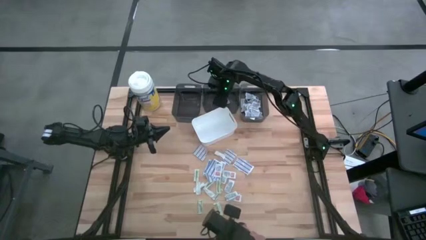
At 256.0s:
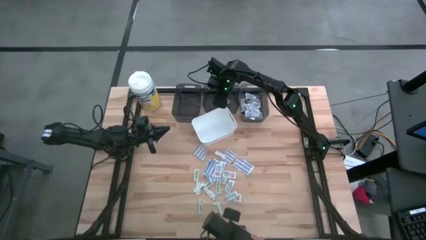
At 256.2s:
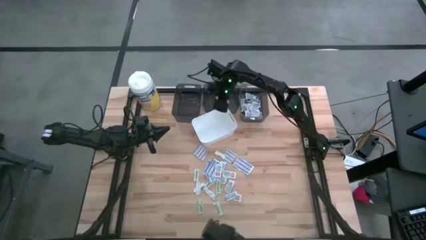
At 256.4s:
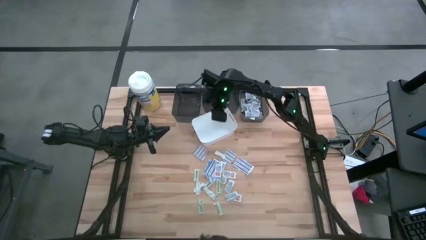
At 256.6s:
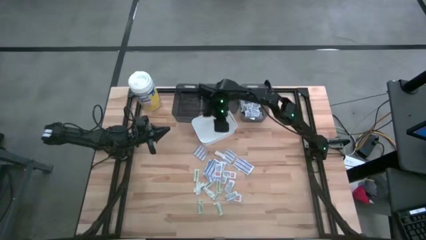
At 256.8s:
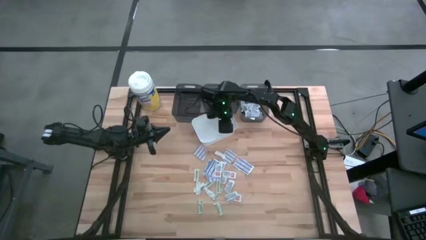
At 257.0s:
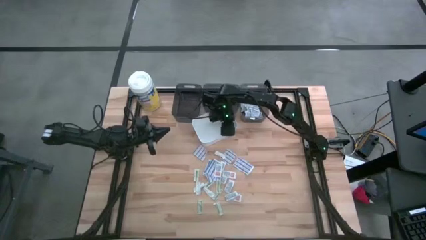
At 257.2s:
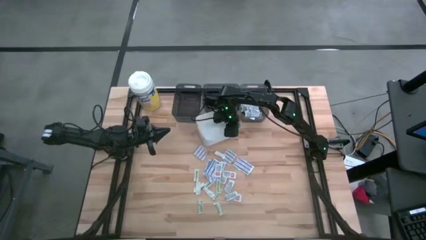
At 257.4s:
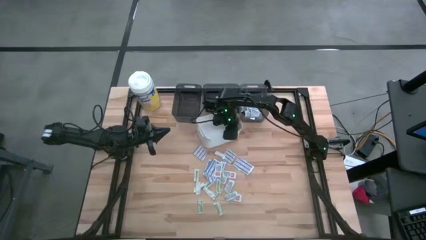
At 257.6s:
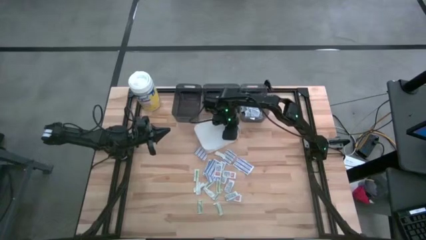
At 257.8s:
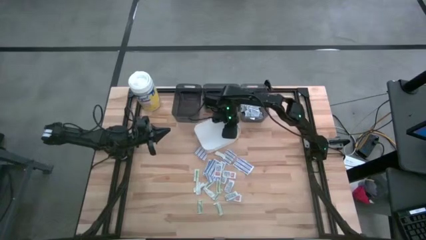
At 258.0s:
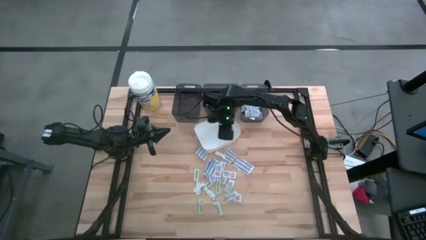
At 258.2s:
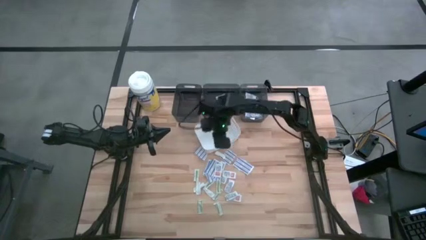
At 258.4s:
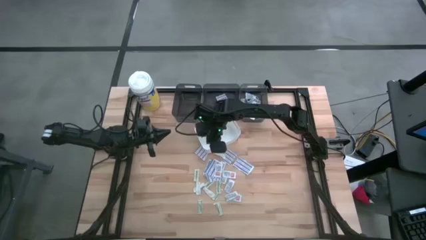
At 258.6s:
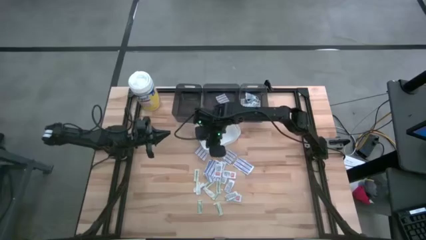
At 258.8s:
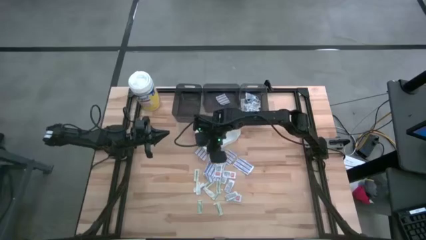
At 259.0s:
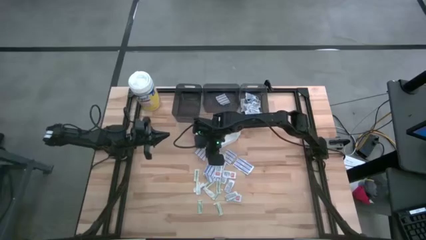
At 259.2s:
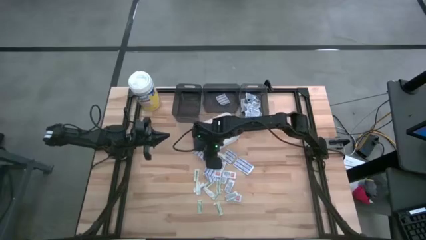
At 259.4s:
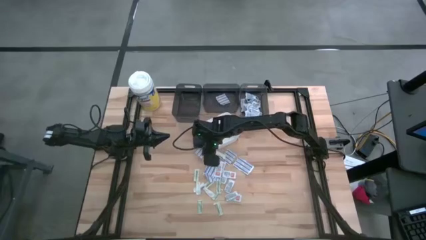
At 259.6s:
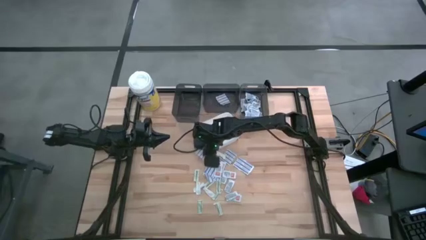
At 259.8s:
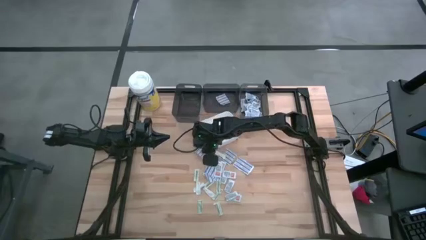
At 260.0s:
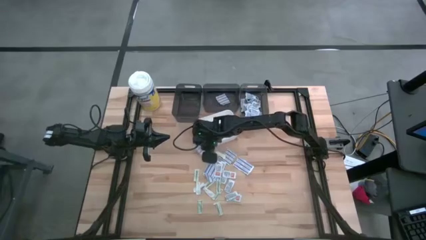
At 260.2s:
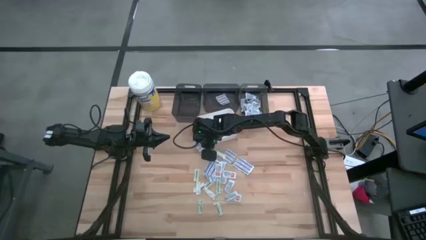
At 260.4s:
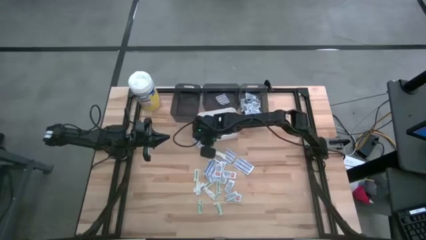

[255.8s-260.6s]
Task: Pick & Place First Aid Supplies
Adjust the white bin

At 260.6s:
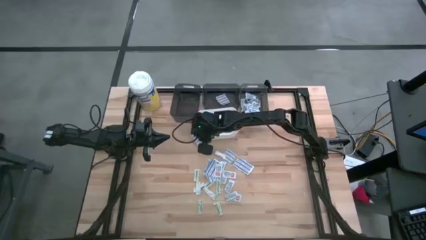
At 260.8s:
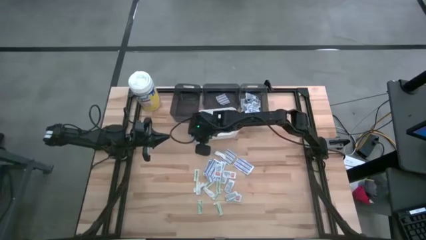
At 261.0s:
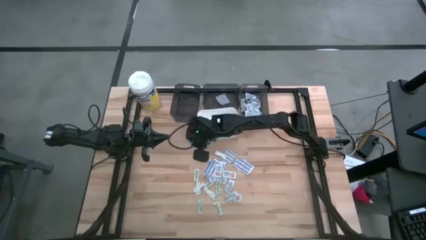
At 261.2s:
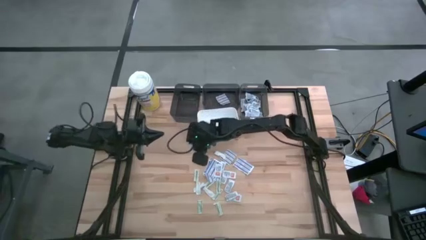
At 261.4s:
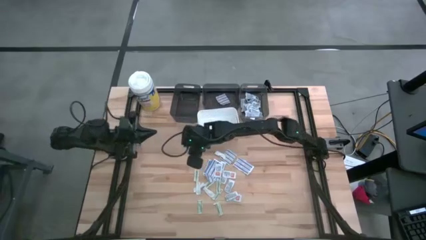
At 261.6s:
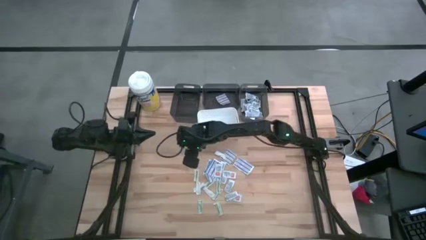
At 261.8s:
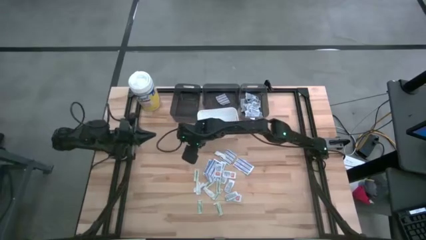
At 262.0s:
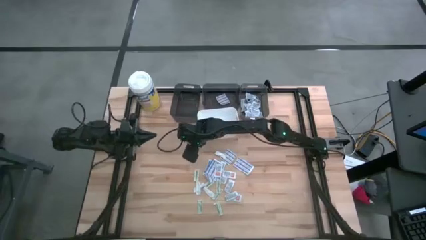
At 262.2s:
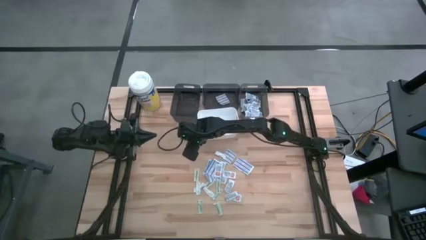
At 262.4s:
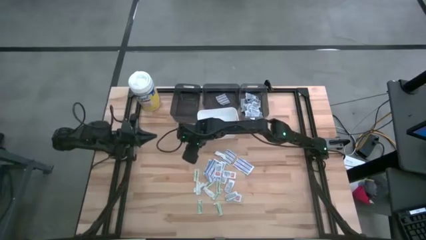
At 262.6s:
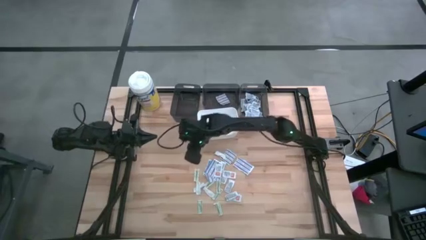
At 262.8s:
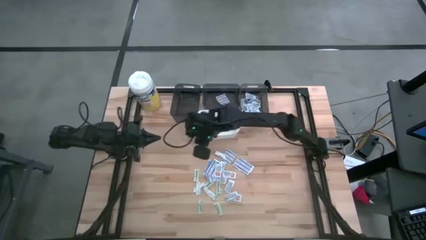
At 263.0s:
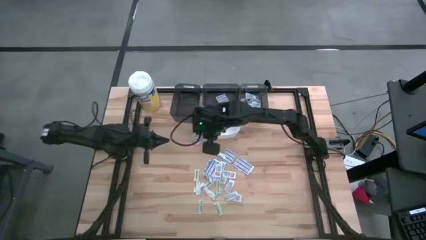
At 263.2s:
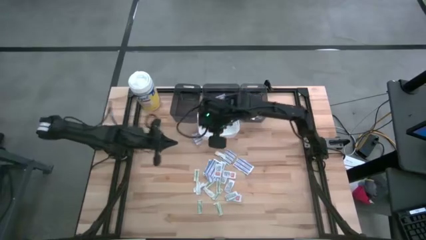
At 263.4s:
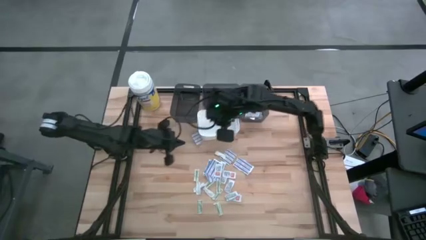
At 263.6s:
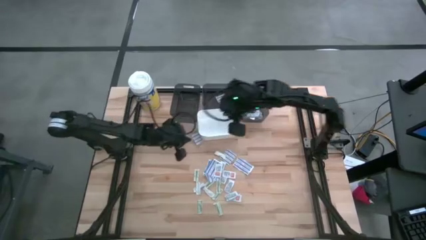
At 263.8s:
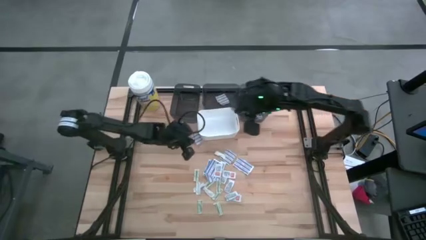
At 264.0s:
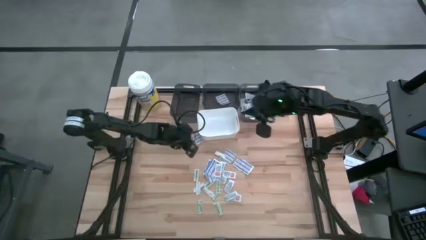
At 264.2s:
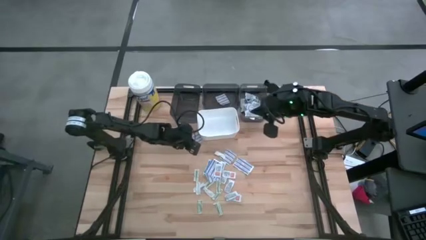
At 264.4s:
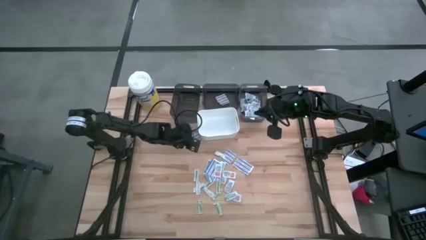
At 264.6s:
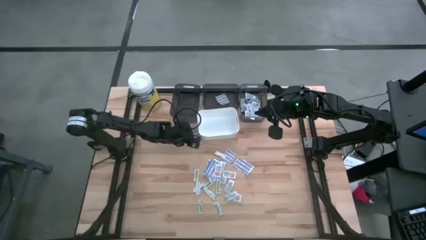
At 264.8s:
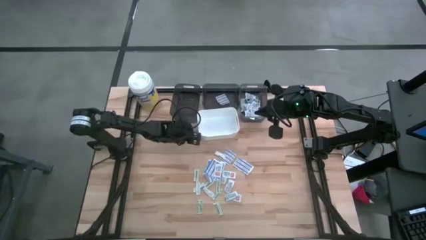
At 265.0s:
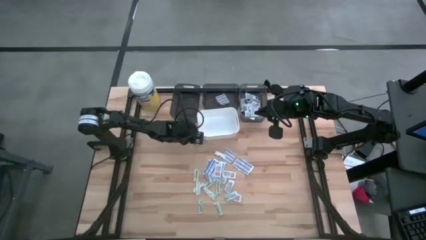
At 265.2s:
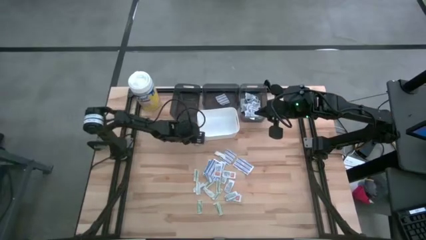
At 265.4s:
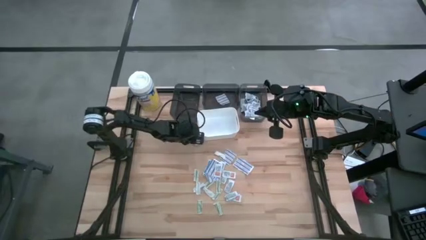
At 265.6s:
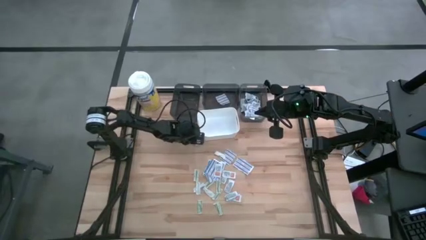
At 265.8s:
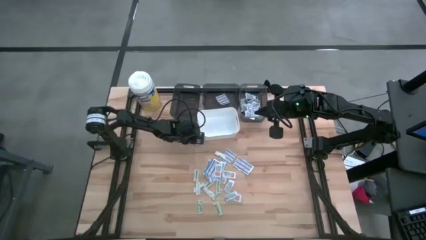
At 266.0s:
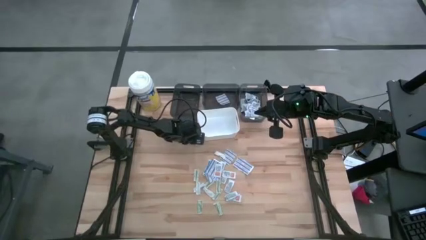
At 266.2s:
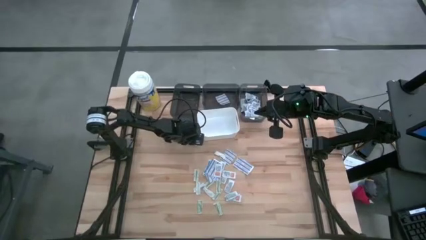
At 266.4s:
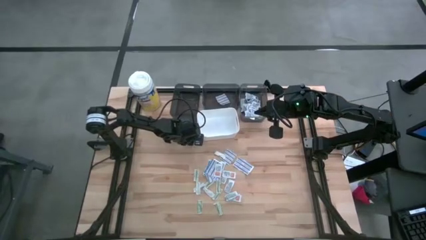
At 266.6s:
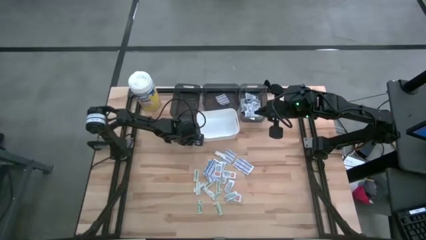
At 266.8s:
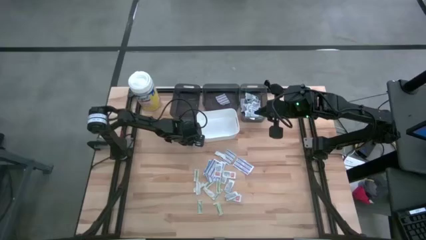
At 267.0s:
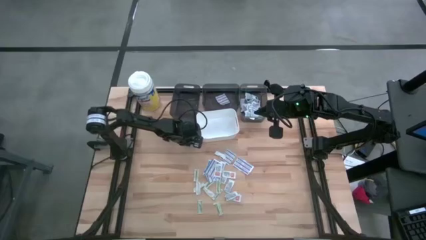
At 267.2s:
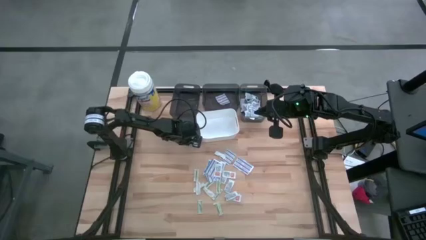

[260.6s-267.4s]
Put the blue bandage pack into the middle black bin

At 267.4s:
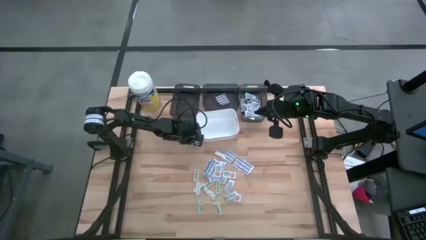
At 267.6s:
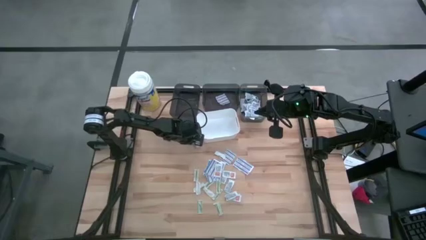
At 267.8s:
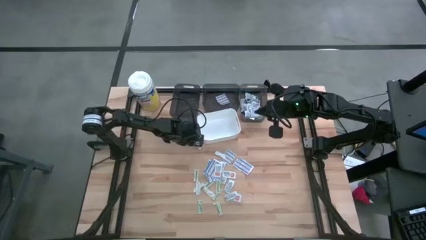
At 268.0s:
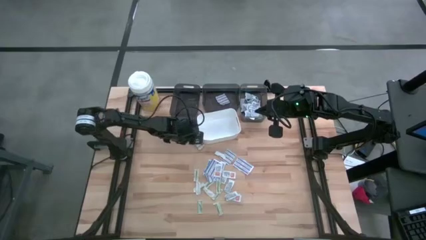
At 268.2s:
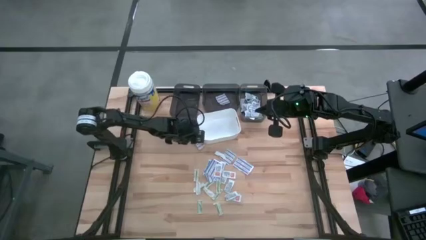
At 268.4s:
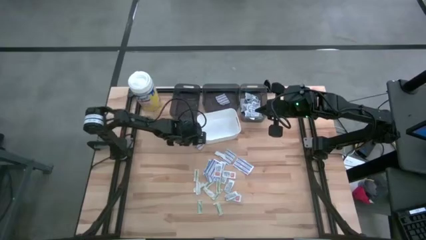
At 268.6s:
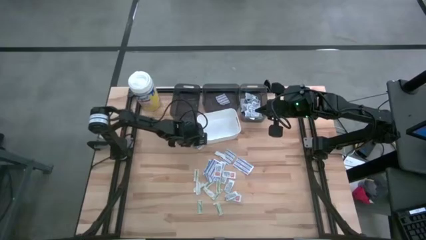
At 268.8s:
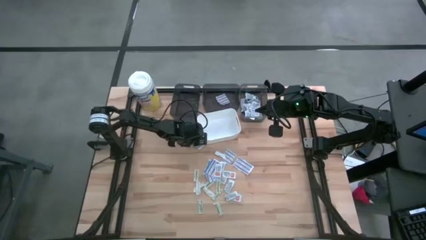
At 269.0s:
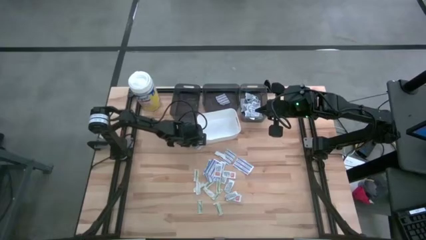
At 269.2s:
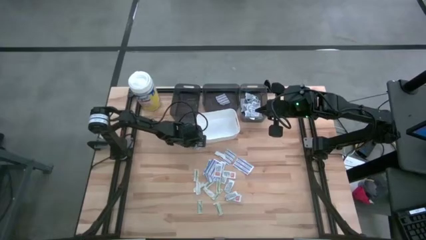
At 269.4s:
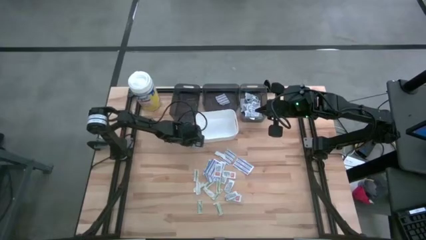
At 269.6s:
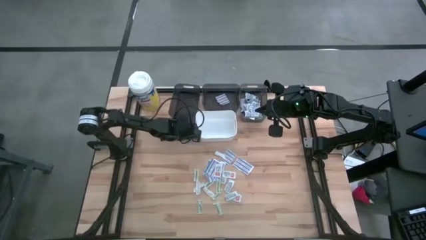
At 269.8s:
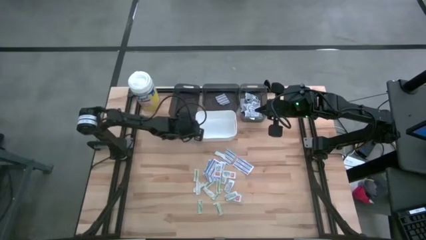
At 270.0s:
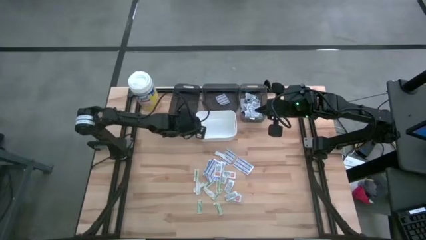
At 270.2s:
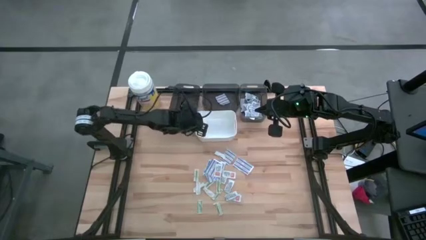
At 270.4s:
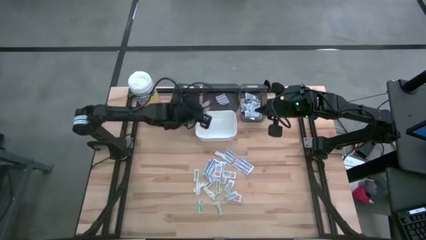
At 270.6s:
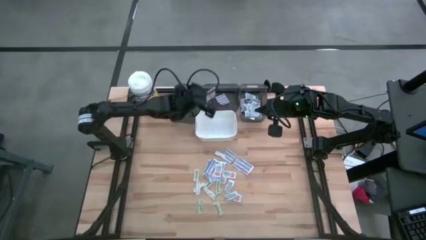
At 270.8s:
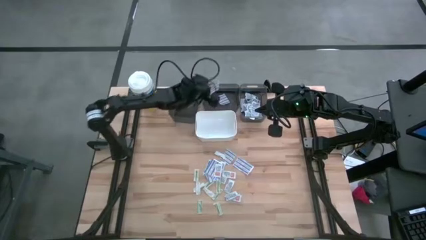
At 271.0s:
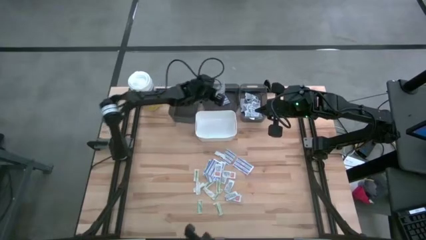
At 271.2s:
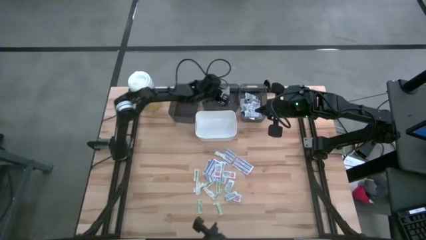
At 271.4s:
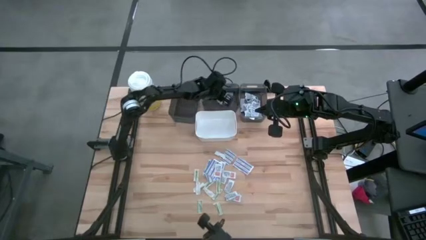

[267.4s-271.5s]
Put the blue bandage pack into the middle black bin
